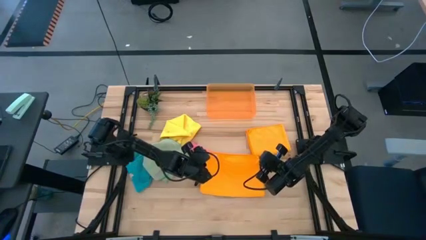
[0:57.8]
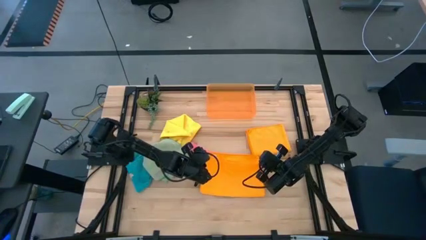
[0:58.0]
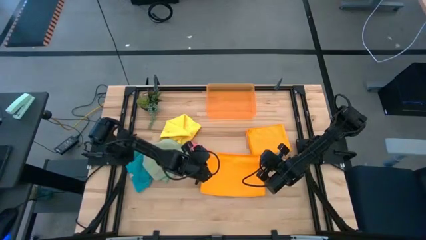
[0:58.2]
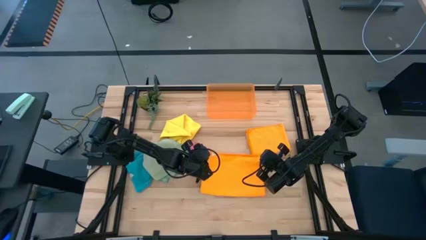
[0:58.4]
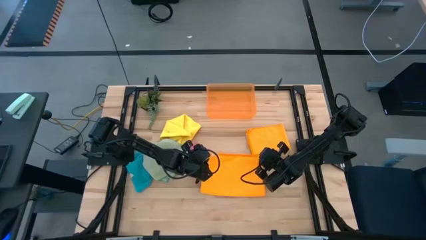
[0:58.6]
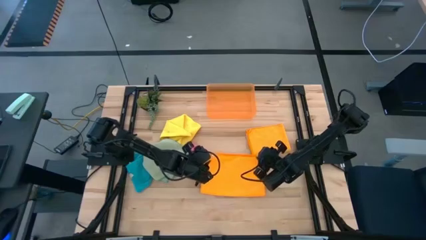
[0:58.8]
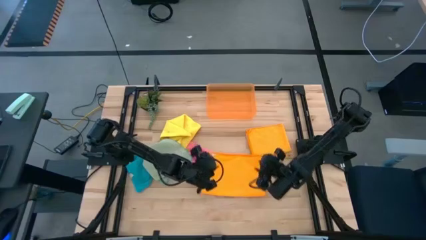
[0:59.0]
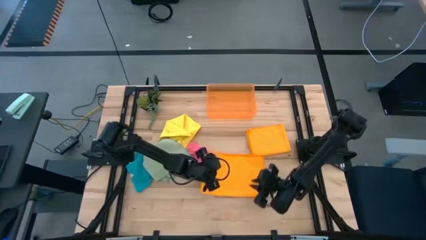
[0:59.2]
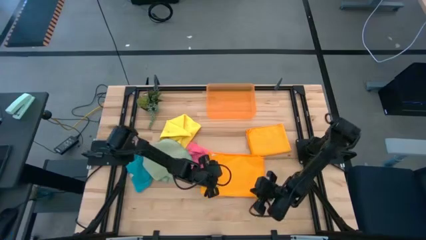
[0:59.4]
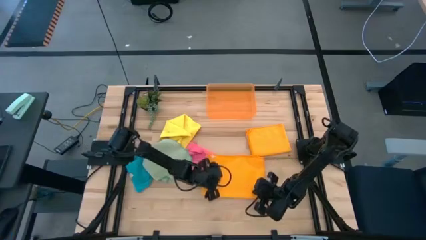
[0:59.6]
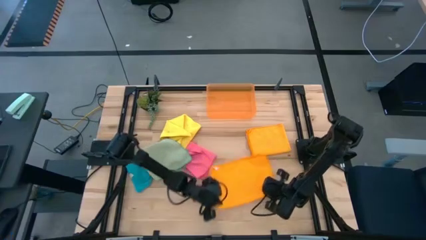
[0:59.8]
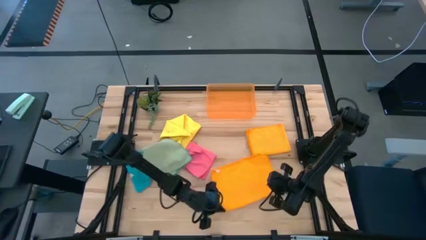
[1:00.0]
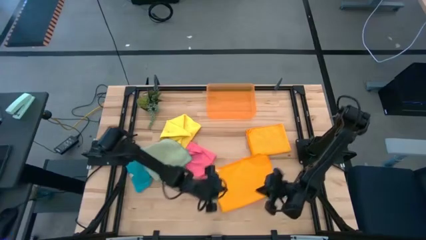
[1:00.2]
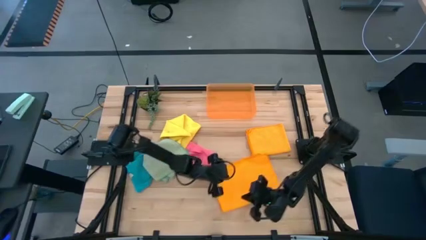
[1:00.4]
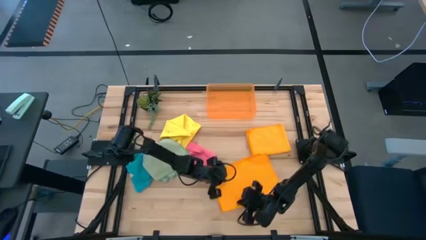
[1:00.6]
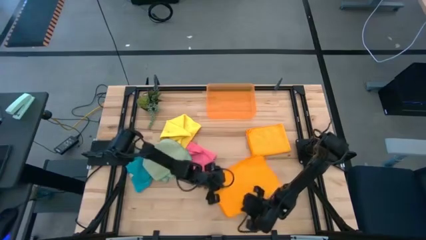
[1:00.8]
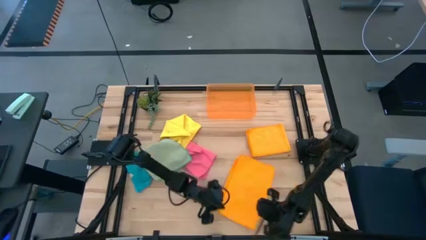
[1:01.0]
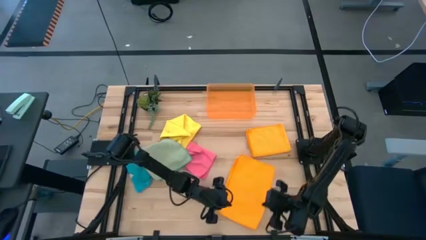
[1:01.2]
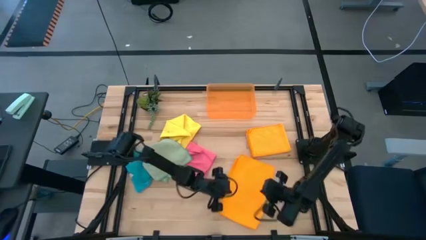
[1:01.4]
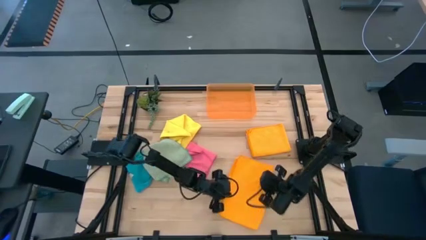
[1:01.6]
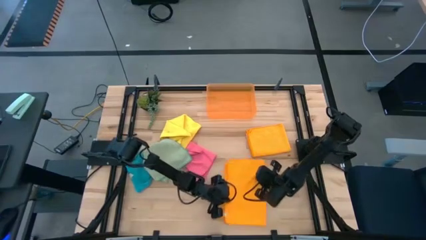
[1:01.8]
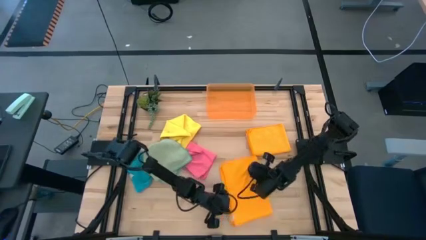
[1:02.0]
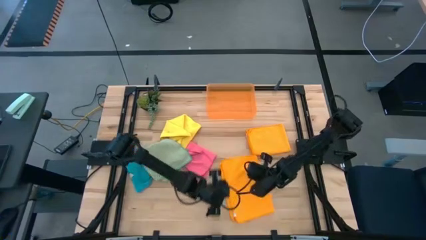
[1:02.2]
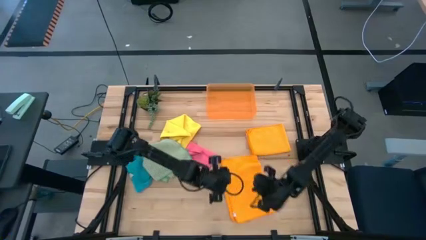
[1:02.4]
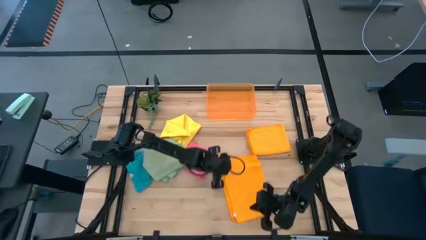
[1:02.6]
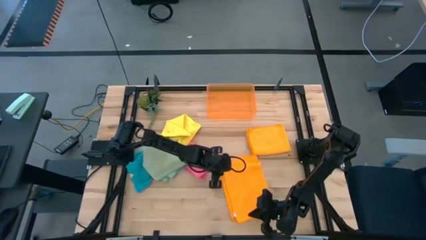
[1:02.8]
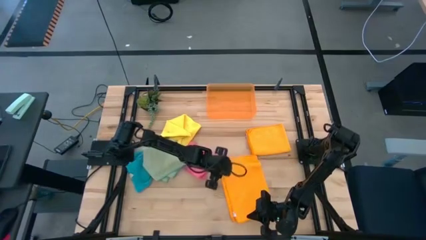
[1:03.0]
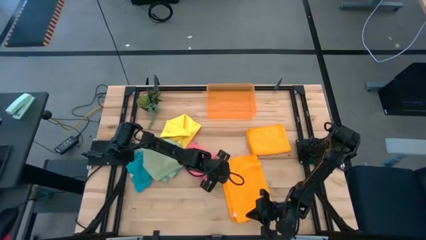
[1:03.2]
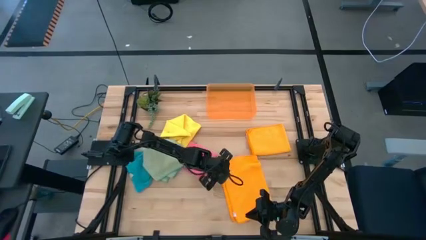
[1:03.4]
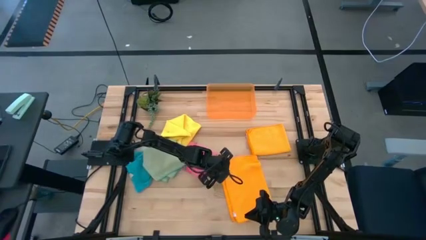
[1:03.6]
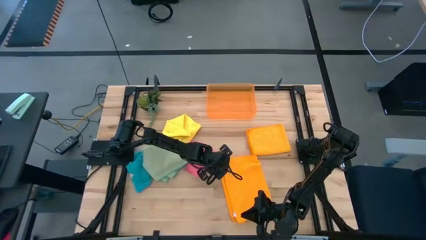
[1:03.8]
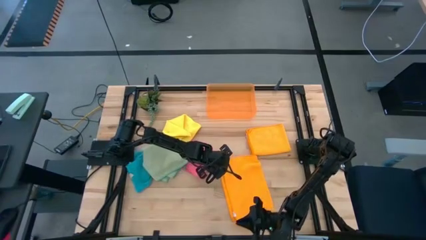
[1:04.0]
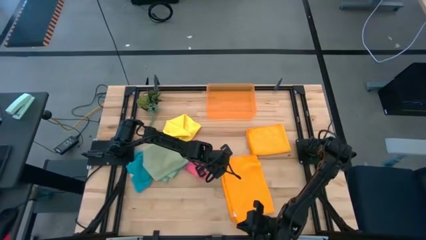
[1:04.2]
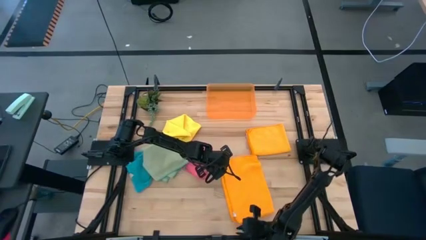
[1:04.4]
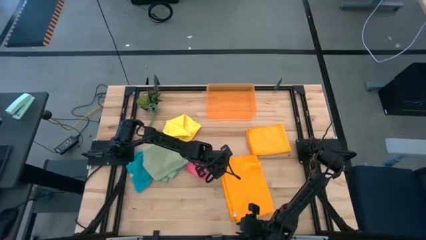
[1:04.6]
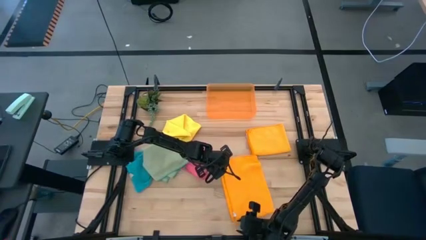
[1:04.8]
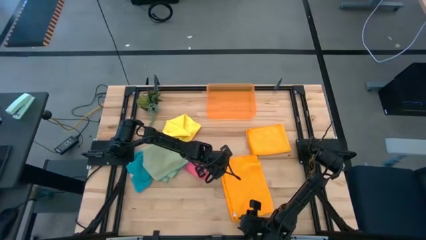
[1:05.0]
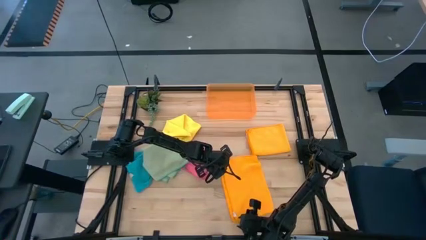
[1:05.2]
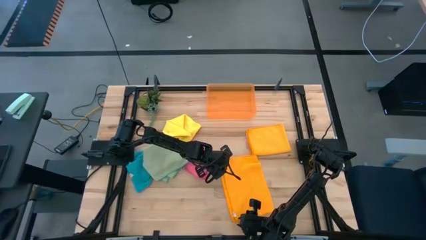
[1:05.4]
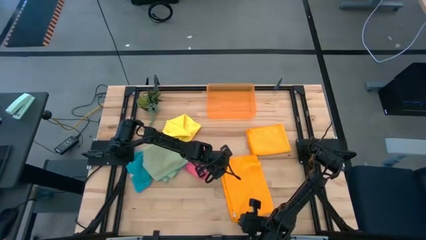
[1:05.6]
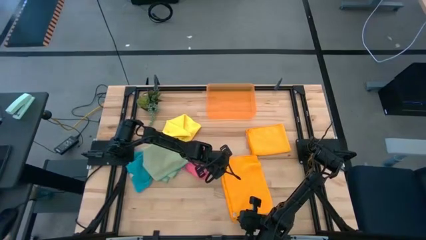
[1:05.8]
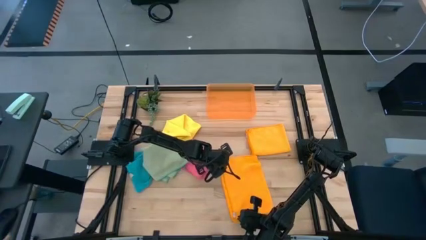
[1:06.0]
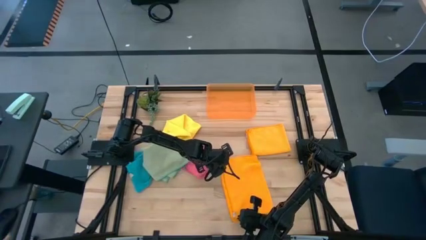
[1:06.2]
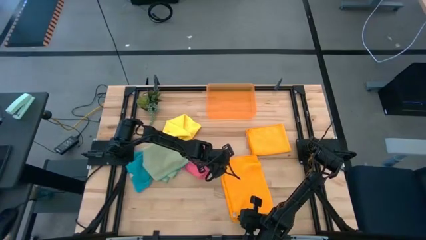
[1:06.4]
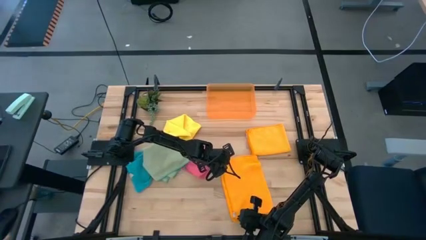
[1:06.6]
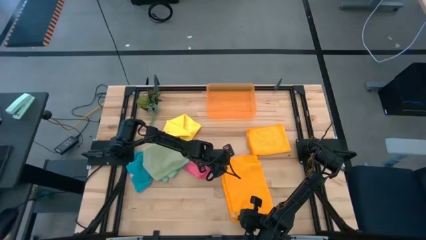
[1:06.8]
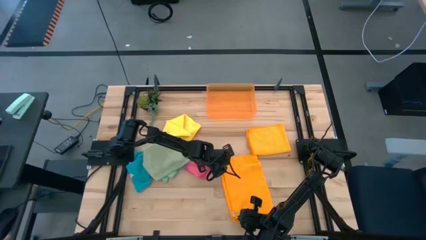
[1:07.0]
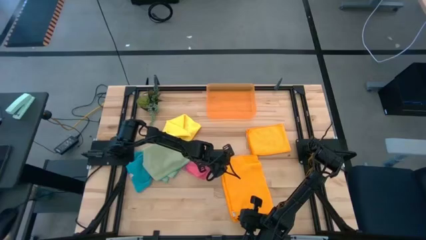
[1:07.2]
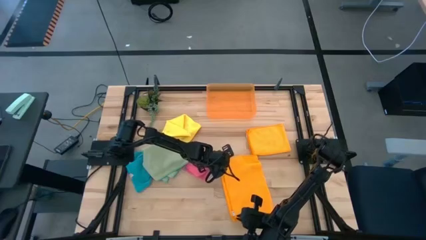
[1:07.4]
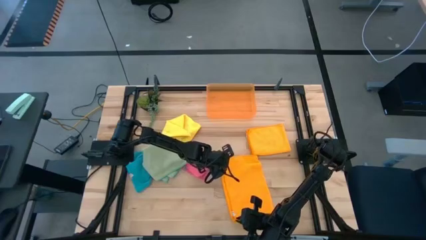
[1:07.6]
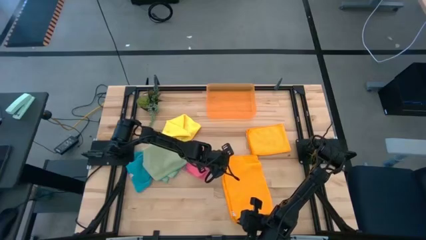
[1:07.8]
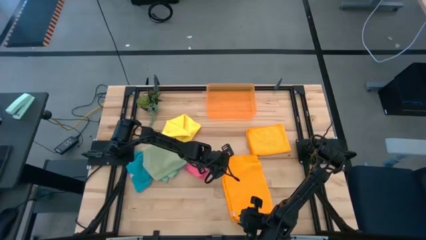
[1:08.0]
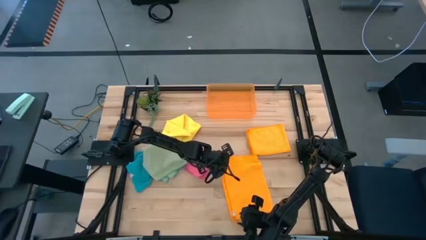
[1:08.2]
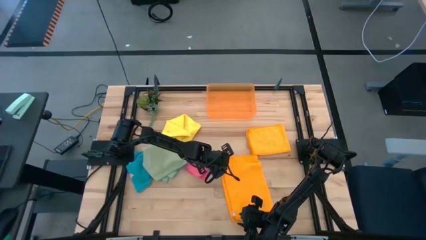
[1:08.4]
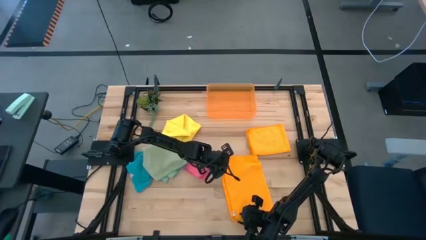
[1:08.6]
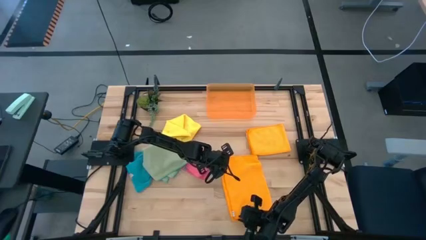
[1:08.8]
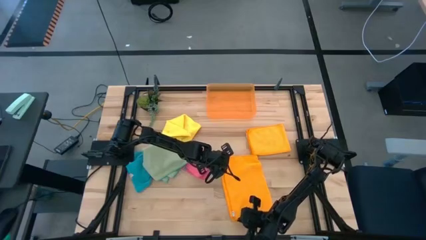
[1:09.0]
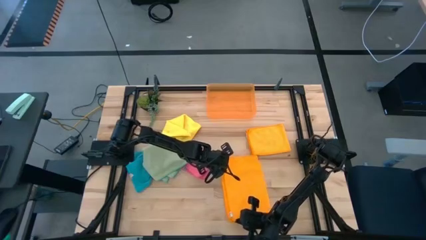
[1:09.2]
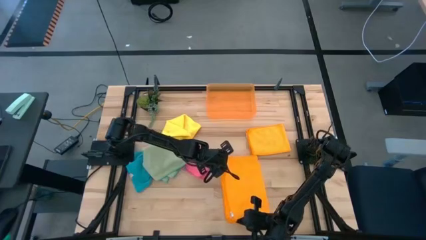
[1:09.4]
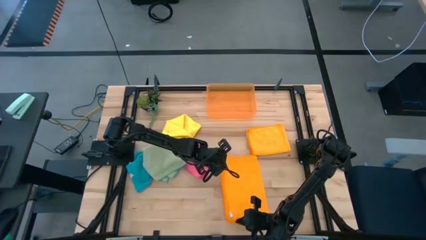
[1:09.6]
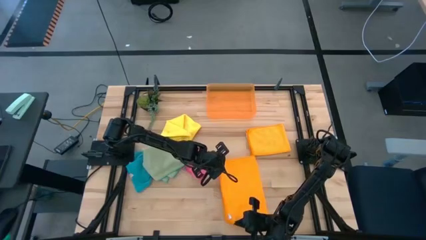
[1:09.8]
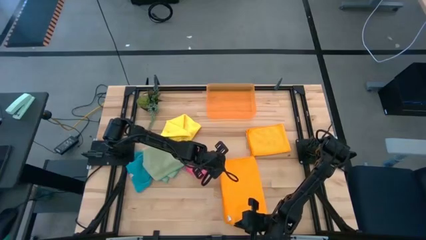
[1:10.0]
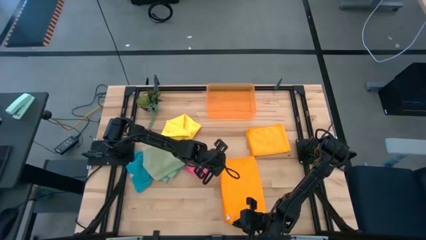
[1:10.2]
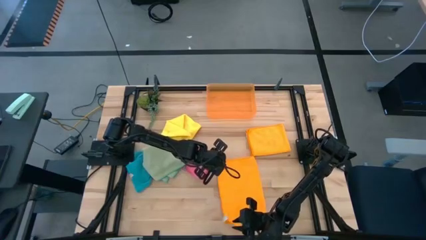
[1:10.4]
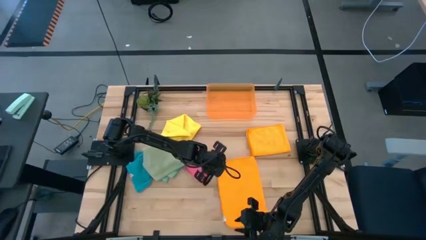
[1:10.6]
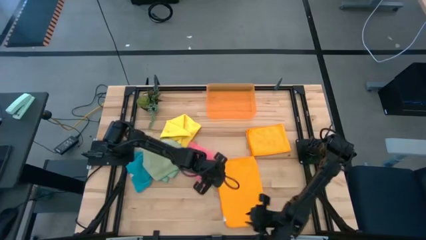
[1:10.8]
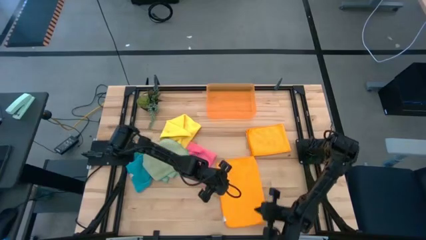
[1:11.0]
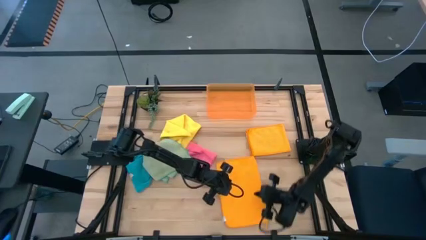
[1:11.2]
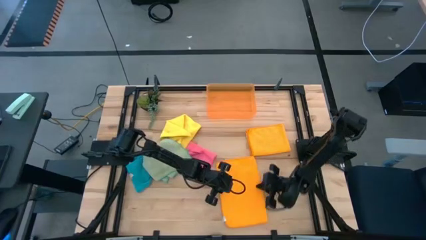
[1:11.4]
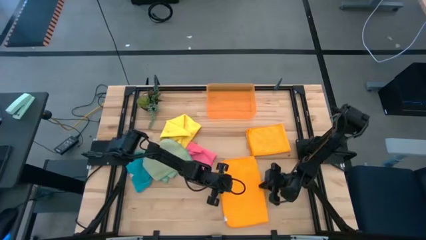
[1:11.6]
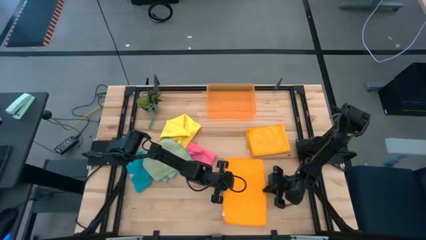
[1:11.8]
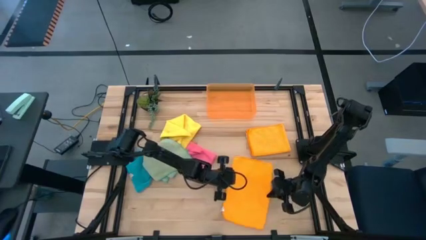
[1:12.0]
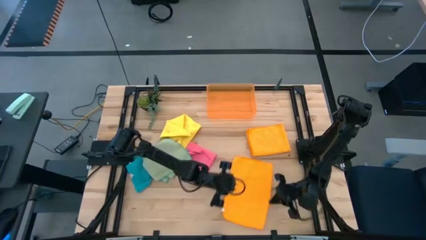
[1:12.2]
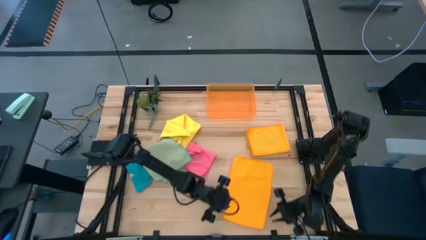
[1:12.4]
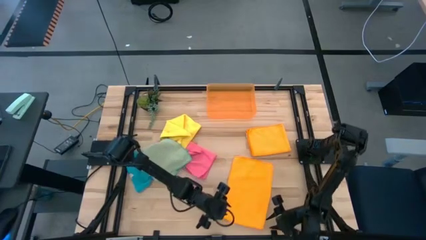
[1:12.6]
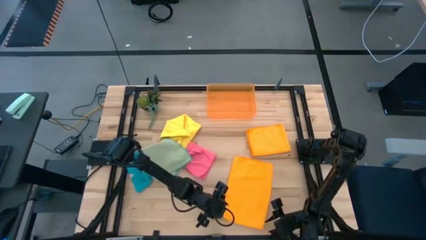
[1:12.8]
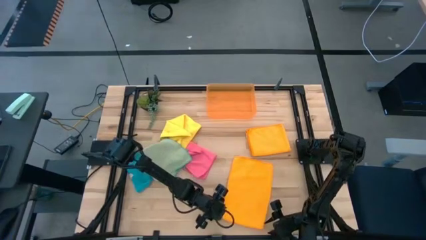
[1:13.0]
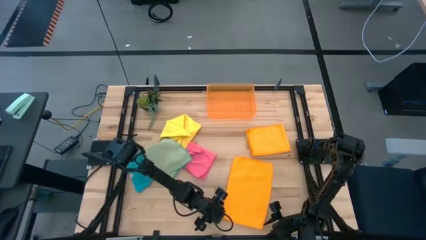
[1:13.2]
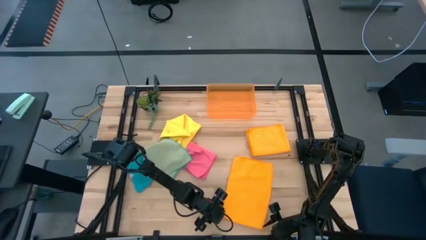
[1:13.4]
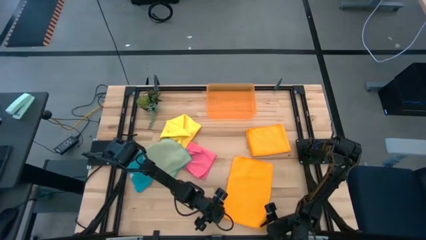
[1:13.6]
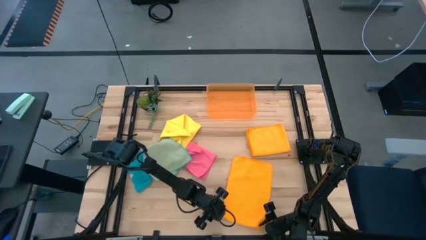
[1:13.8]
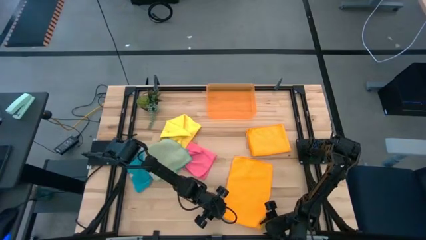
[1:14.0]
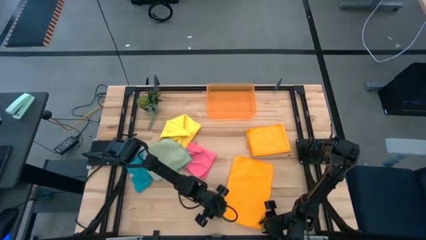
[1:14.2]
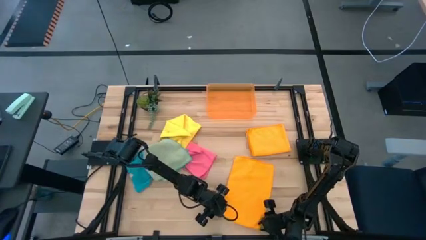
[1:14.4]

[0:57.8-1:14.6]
Task: Fold microfiber towels
Fold the left orange microfiber cloth
